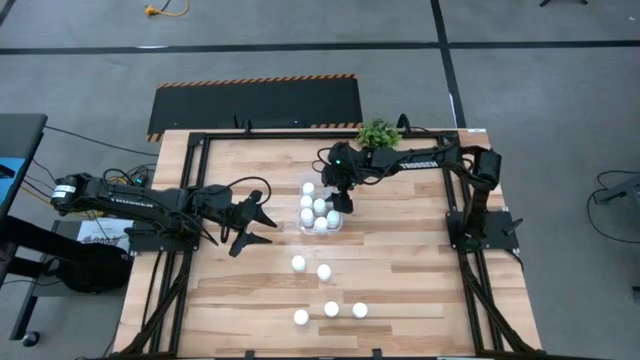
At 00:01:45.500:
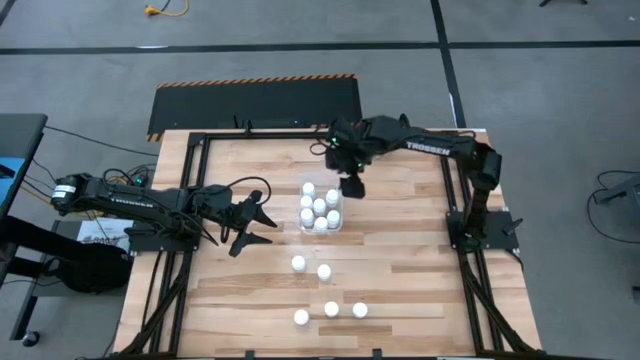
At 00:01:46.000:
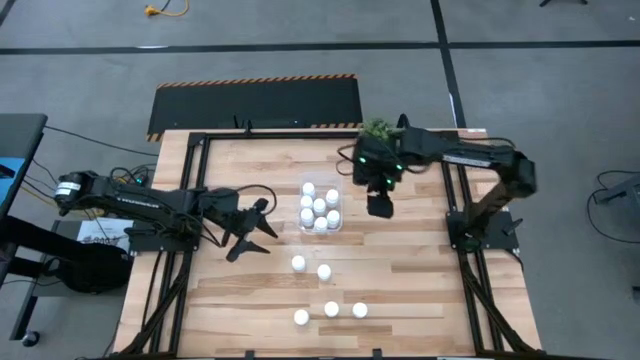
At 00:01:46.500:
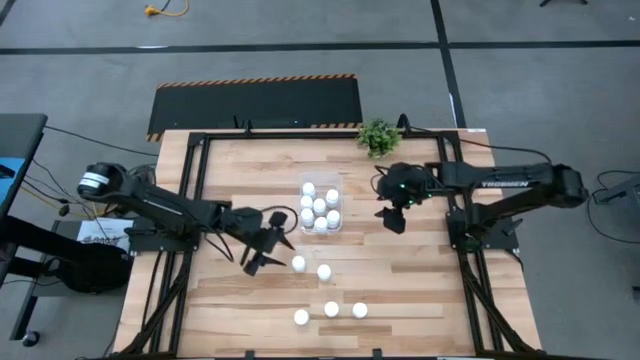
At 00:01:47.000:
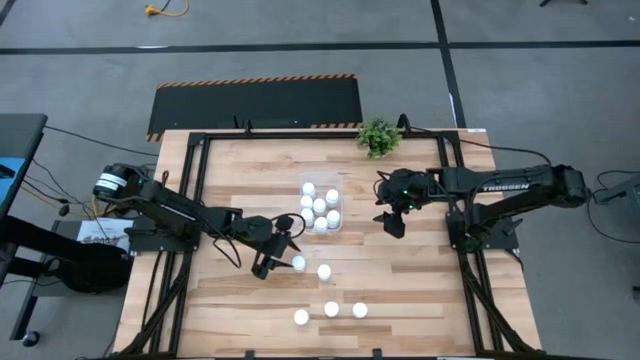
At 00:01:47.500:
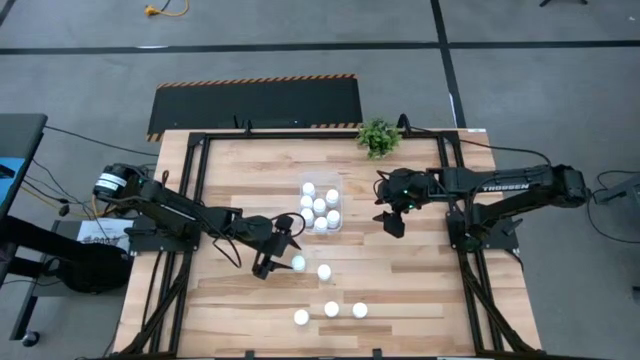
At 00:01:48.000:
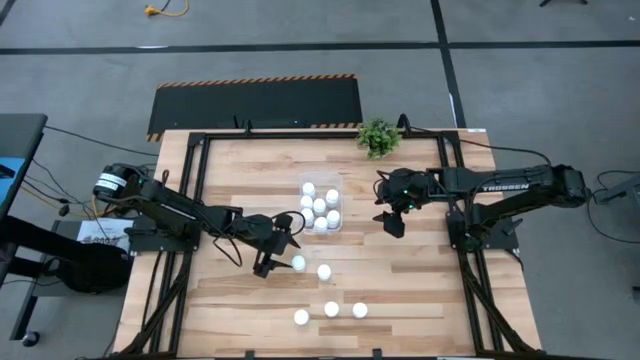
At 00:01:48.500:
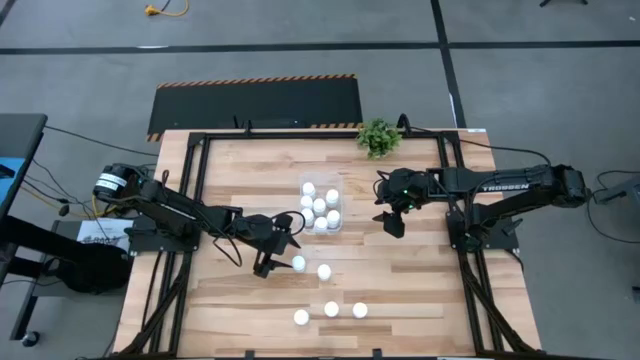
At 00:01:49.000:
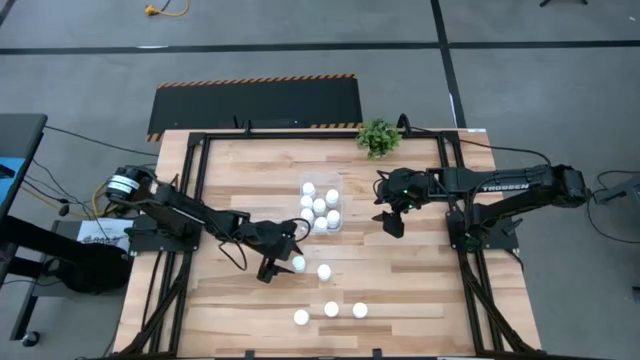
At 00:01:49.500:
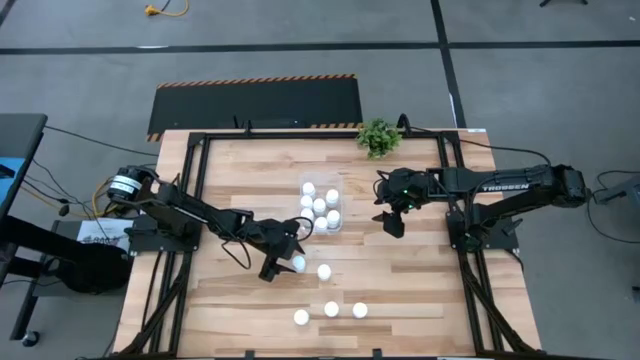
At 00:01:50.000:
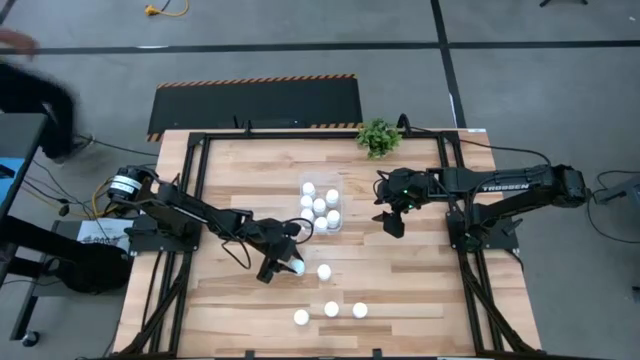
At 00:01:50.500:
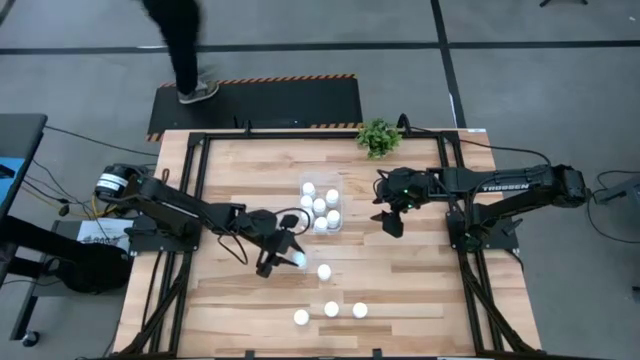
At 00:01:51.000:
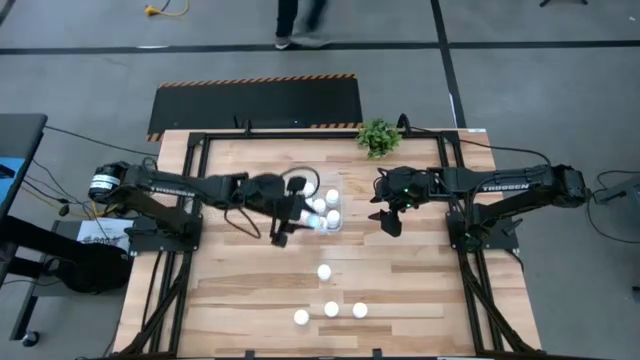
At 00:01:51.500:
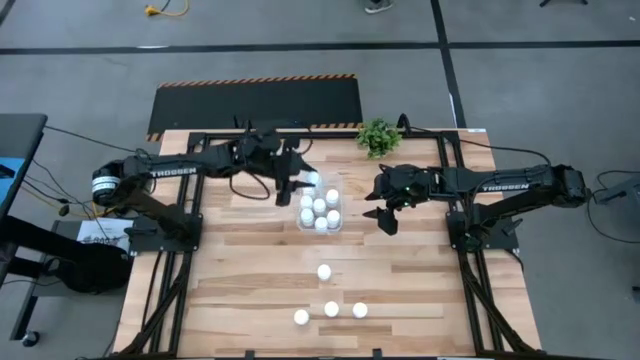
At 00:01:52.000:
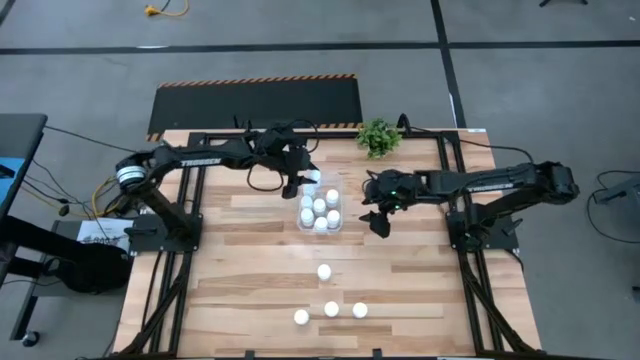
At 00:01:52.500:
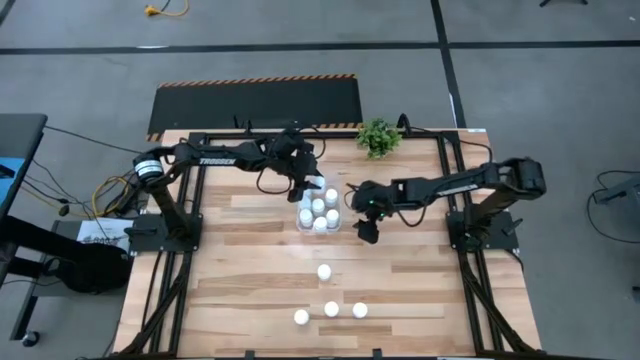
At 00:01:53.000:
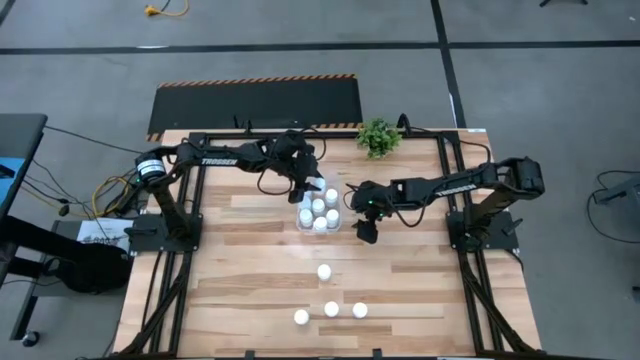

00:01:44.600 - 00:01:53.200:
Task: Pick and place pill bottles into a basket
Put the pill bottles into the container

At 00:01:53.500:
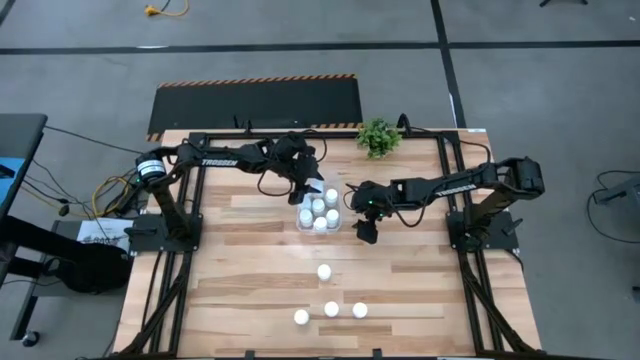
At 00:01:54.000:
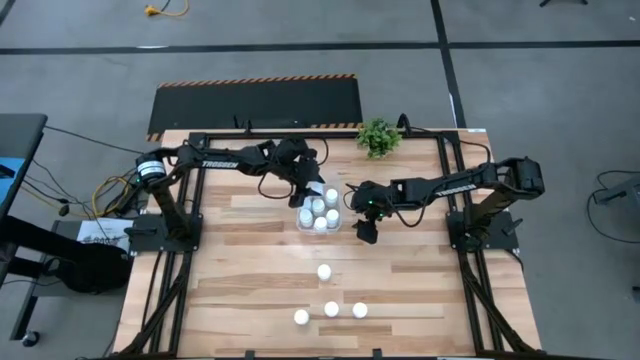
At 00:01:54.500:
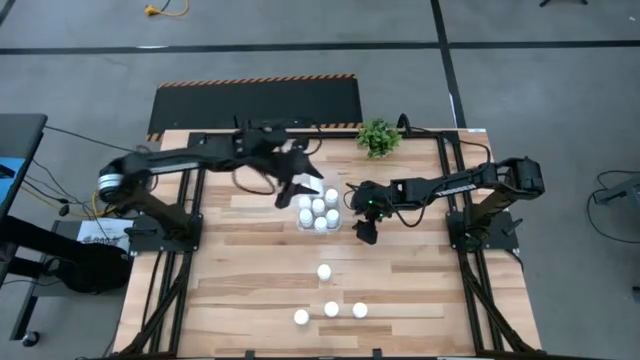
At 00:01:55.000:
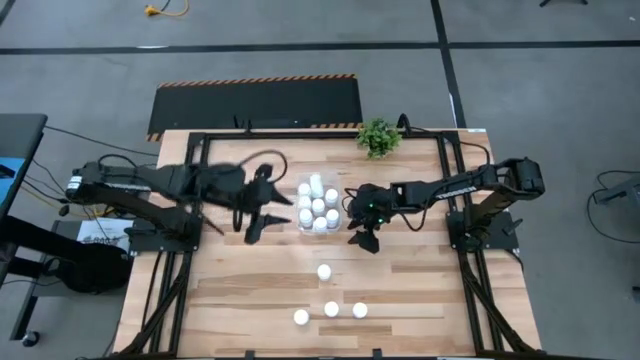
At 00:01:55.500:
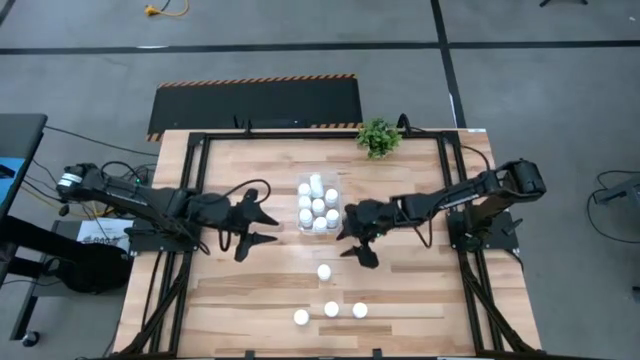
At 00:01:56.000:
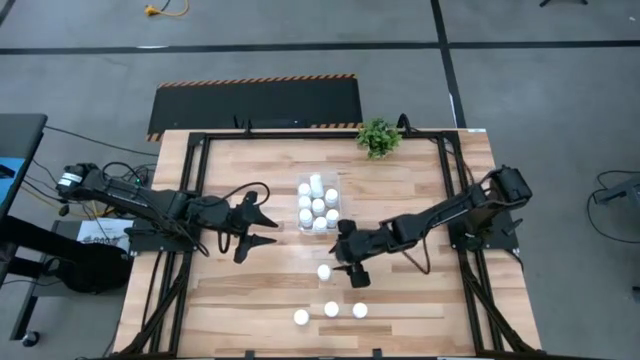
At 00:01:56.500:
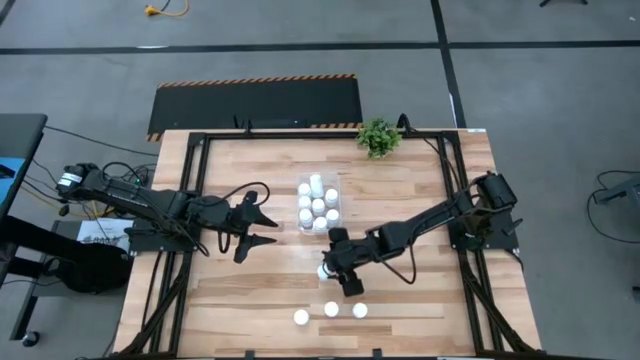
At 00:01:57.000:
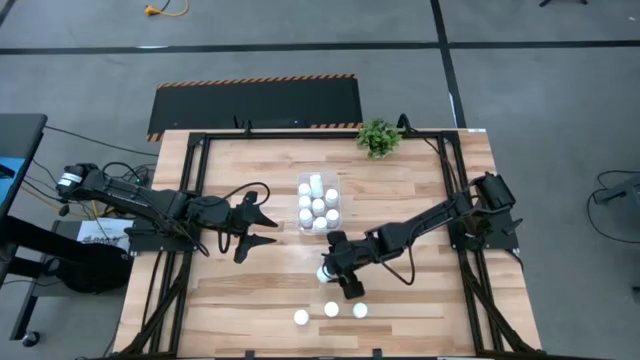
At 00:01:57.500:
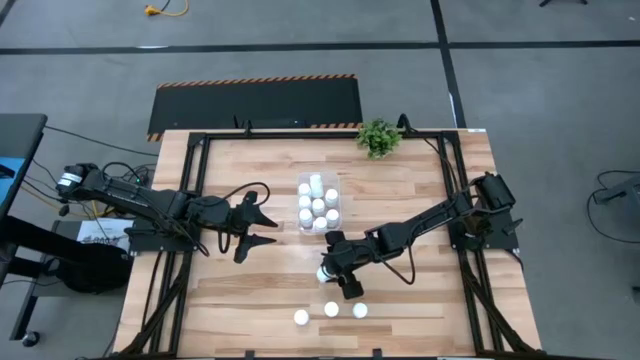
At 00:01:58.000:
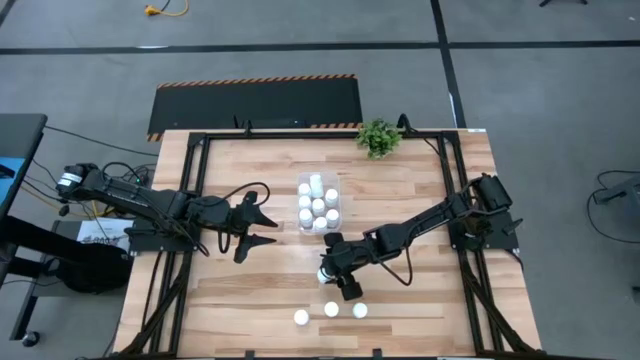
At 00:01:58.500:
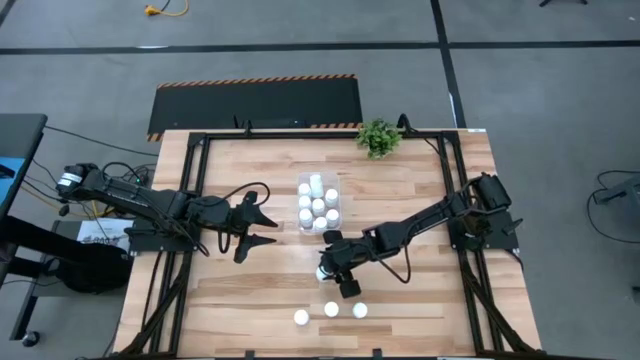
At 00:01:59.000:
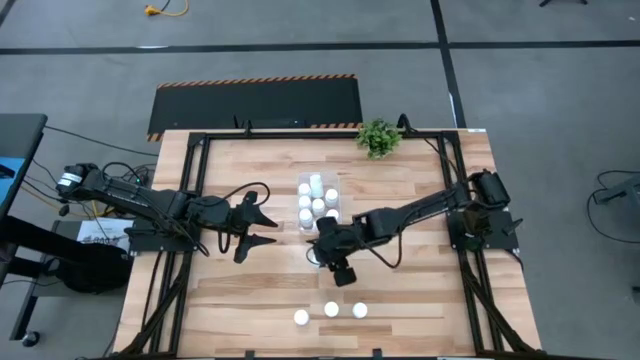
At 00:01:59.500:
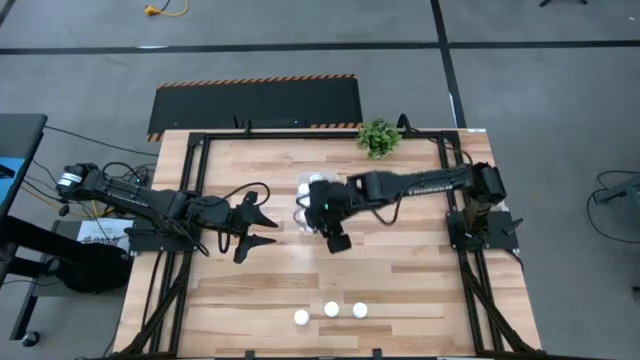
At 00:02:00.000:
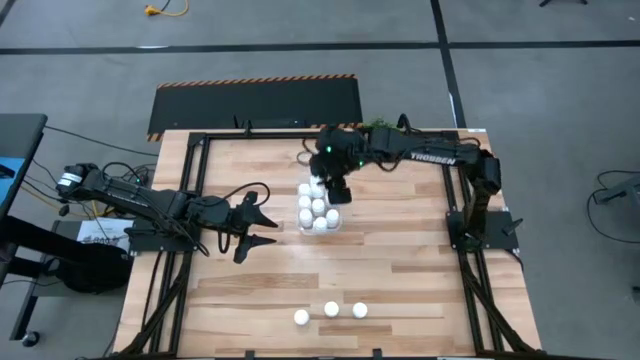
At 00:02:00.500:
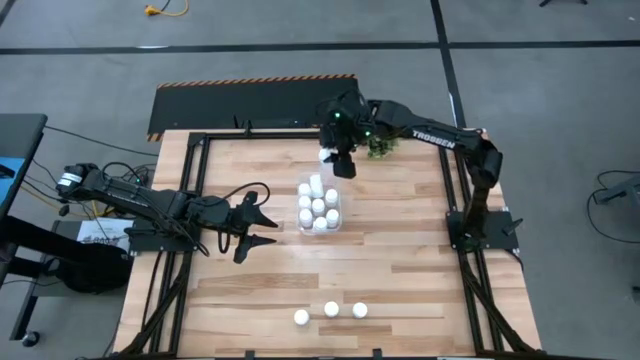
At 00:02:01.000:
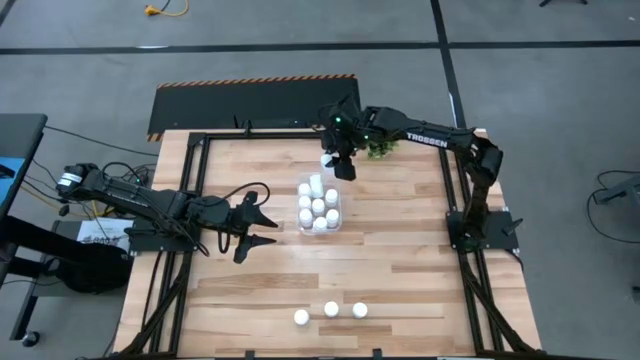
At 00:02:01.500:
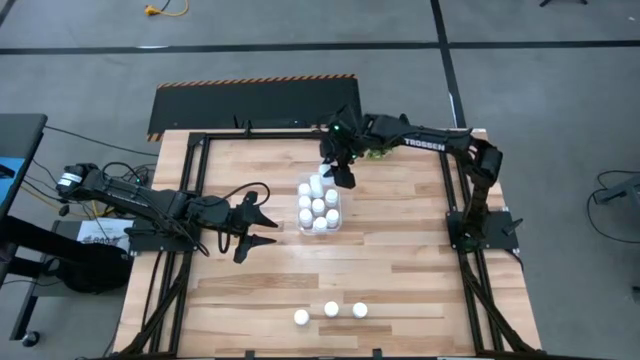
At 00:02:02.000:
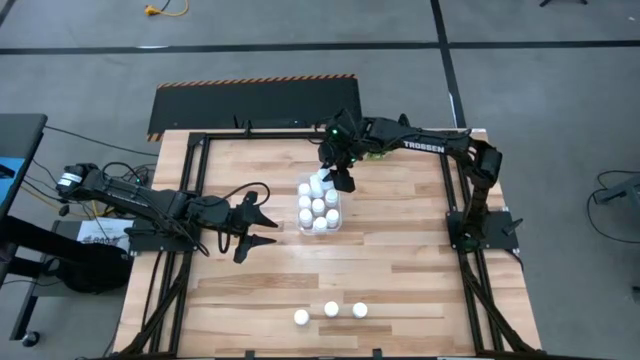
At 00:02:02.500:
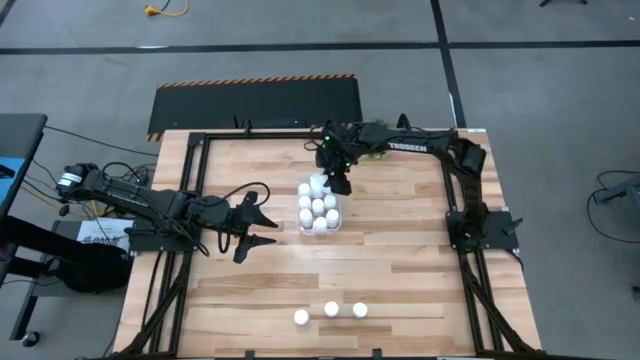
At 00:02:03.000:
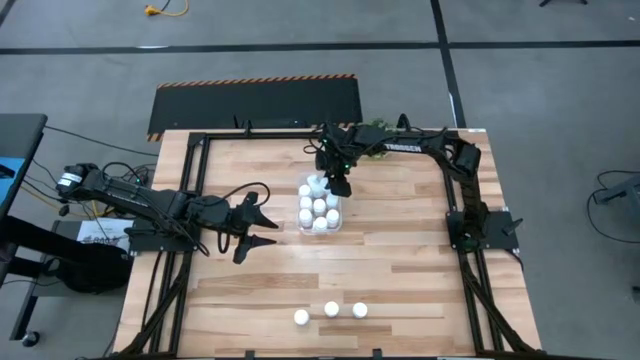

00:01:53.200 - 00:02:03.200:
Put the pill bottles into the container

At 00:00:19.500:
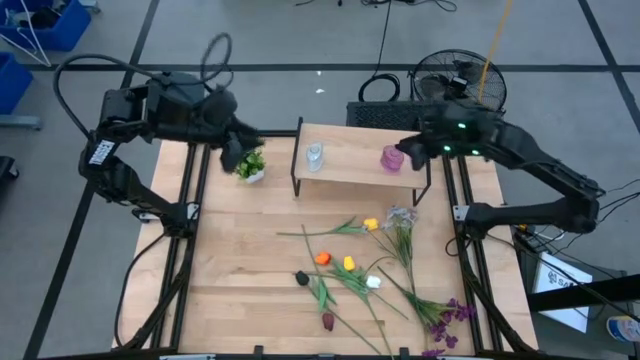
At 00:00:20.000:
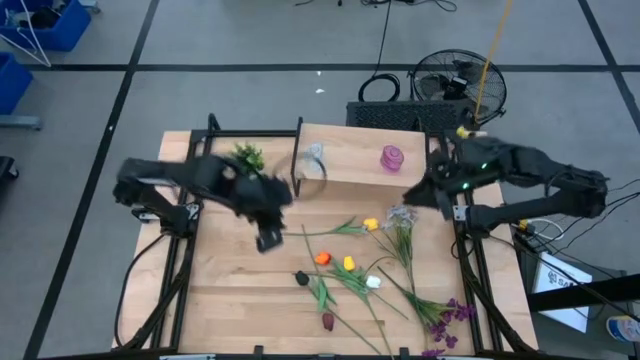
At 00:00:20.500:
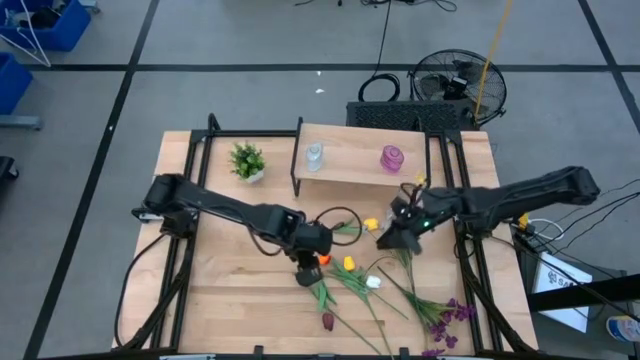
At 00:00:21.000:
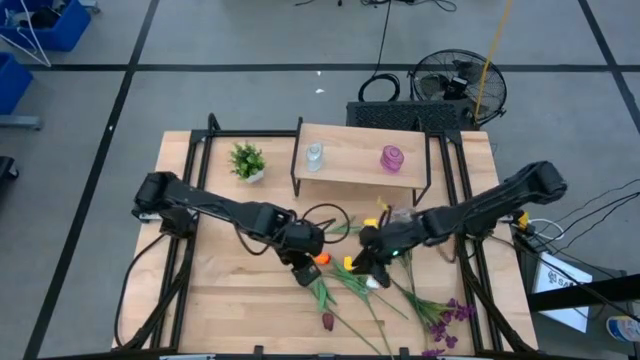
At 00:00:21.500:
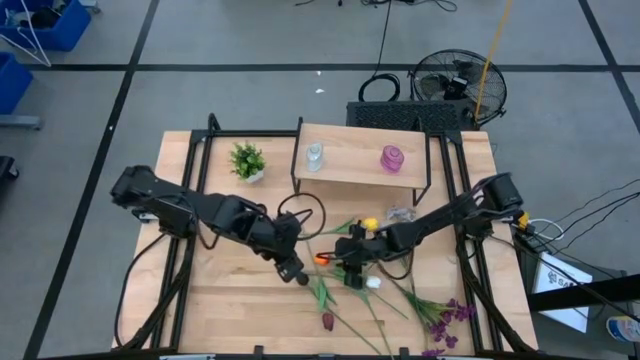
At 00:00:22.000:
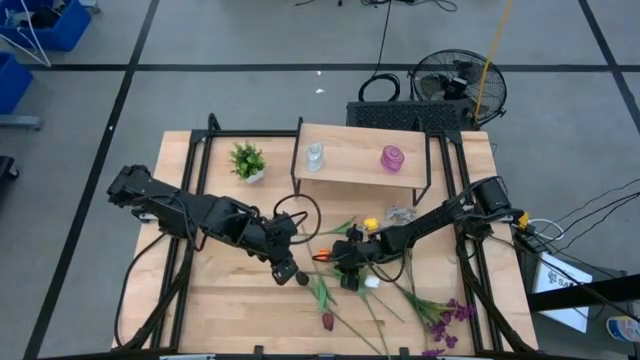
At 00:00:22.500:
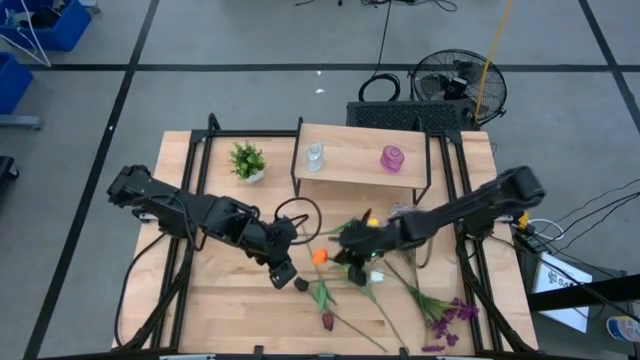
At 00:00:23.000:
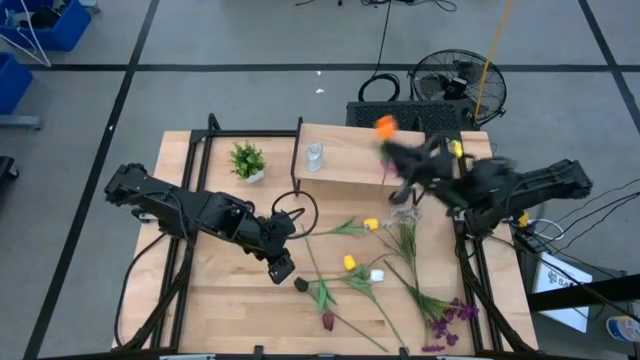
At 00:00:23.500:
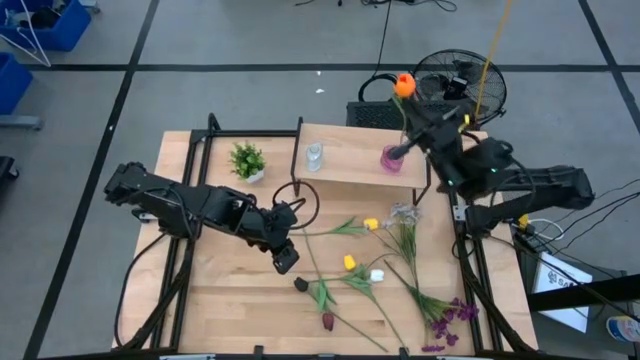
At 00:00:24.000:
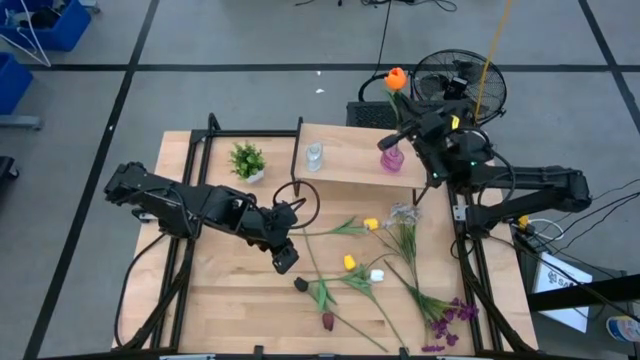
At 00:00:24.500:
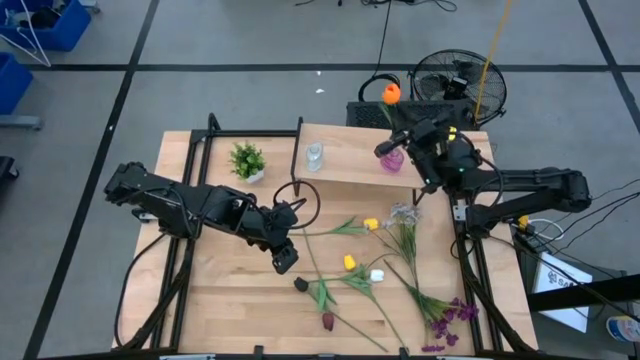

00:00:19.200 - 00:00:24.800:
Task: Pick and place flowers into a vace then onto a shelf
Put the orange tulip into the purple vase
